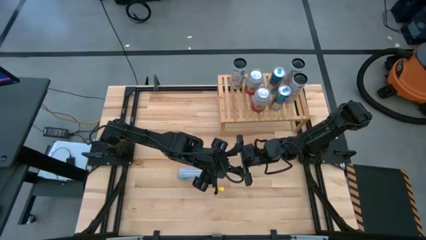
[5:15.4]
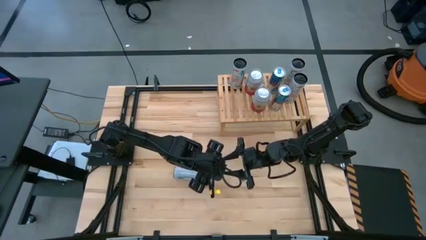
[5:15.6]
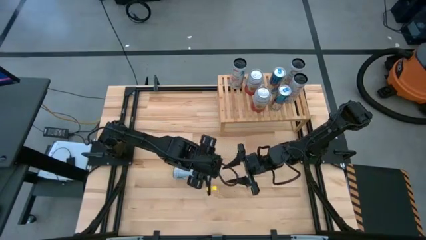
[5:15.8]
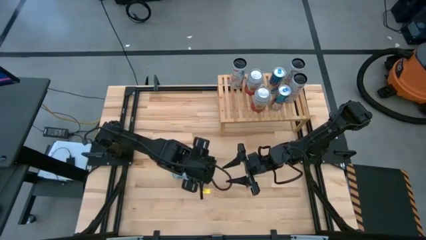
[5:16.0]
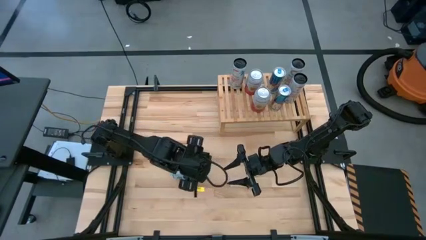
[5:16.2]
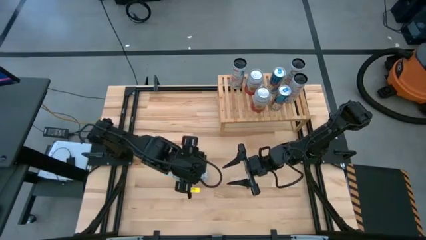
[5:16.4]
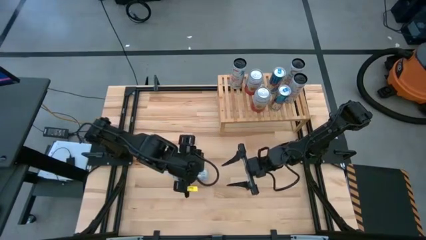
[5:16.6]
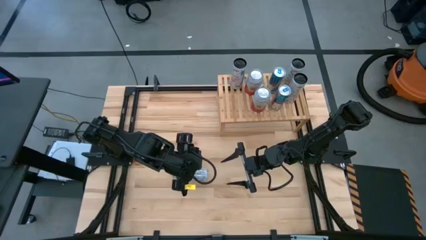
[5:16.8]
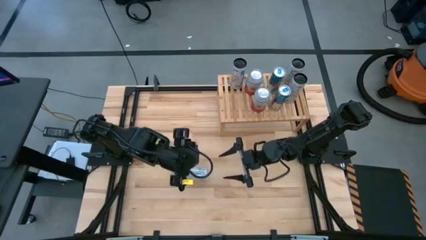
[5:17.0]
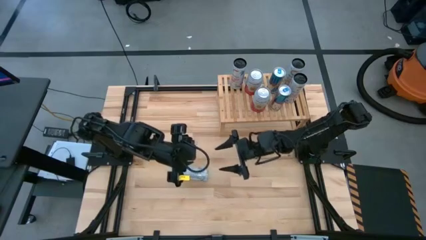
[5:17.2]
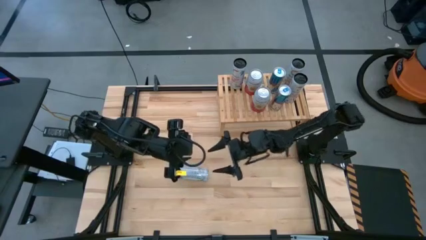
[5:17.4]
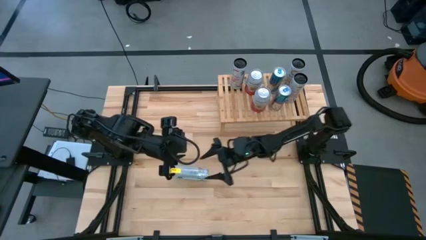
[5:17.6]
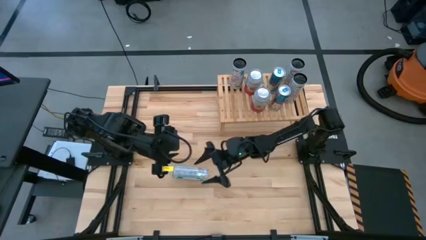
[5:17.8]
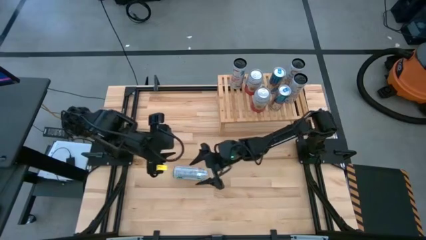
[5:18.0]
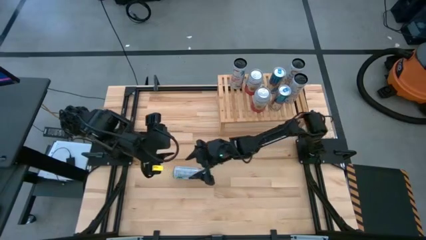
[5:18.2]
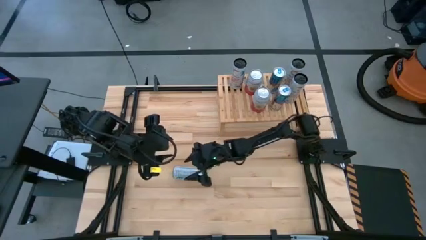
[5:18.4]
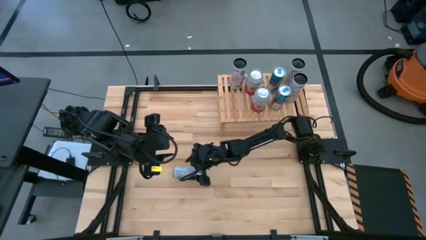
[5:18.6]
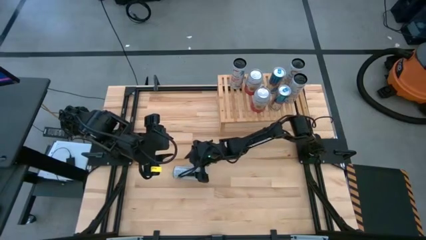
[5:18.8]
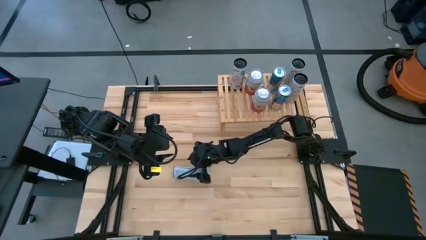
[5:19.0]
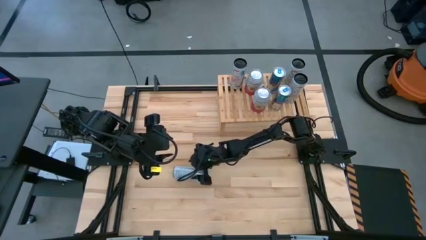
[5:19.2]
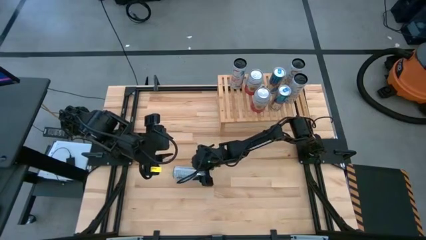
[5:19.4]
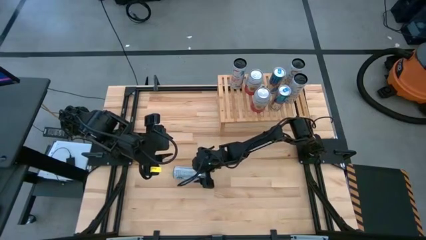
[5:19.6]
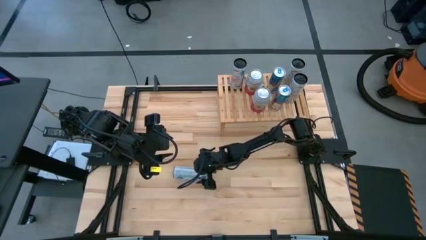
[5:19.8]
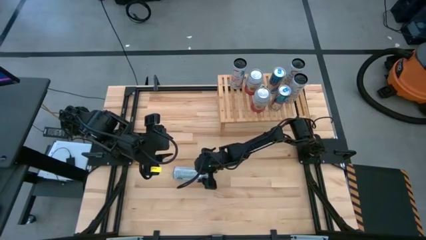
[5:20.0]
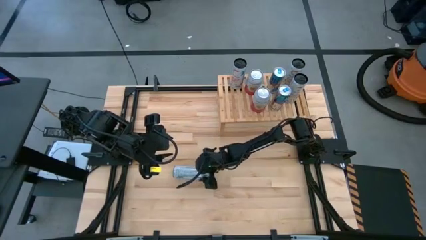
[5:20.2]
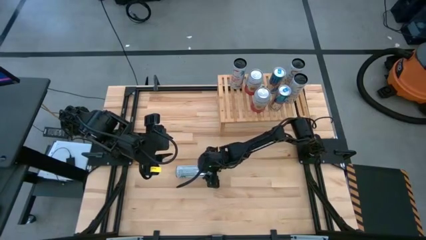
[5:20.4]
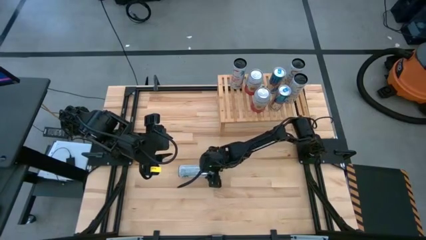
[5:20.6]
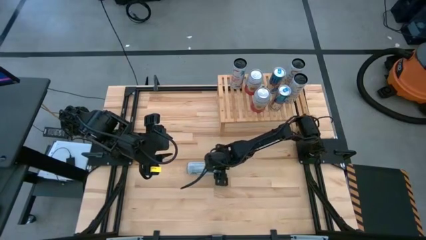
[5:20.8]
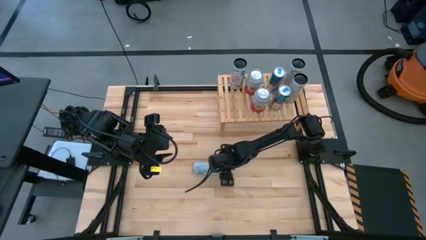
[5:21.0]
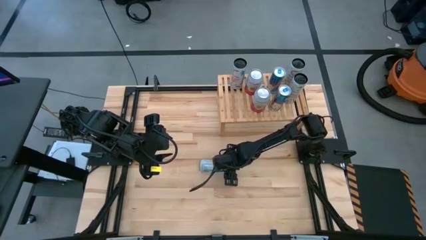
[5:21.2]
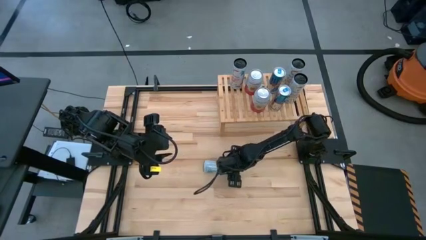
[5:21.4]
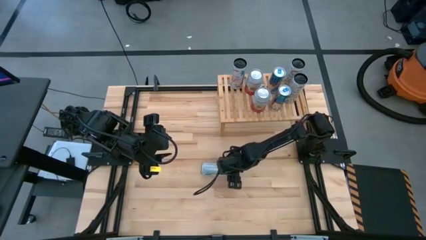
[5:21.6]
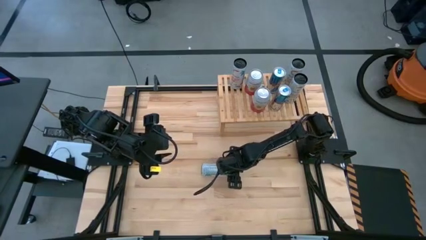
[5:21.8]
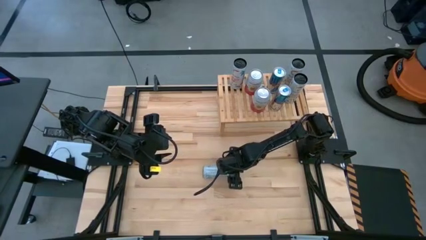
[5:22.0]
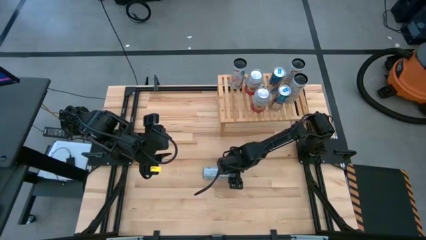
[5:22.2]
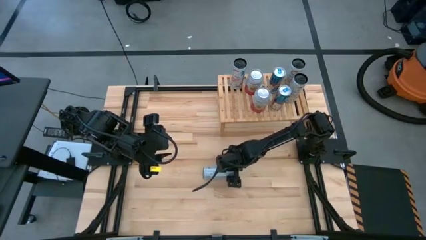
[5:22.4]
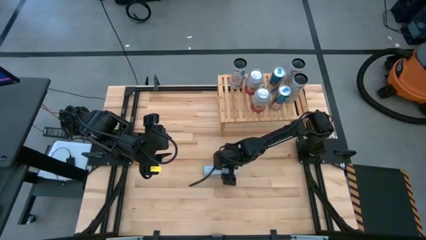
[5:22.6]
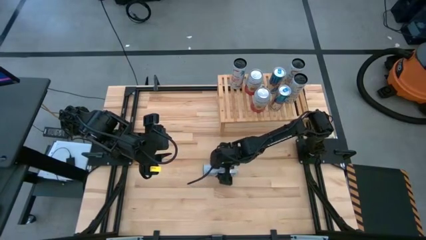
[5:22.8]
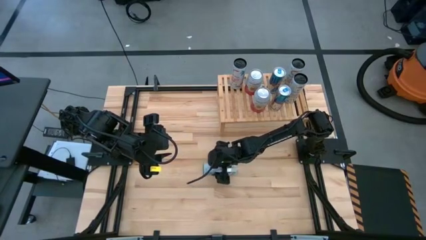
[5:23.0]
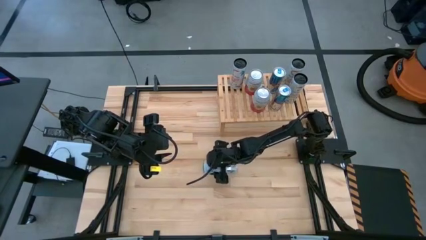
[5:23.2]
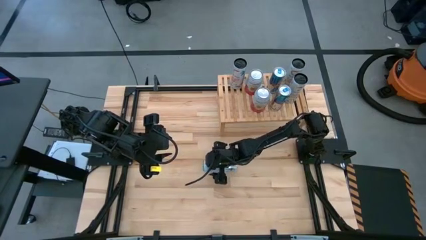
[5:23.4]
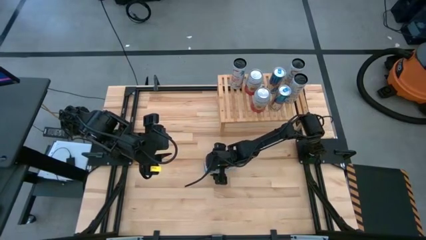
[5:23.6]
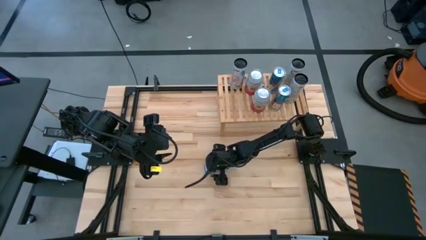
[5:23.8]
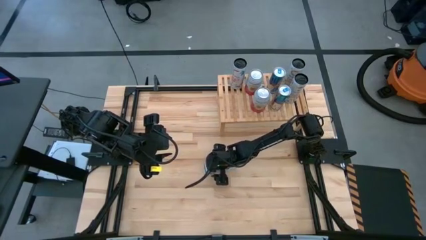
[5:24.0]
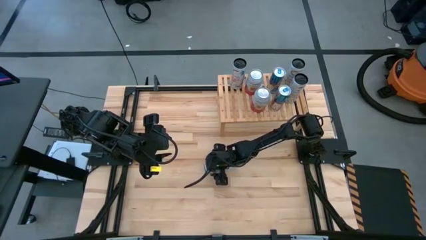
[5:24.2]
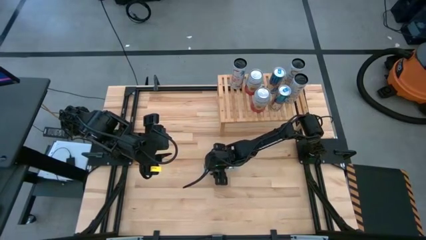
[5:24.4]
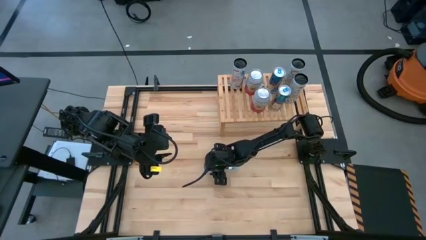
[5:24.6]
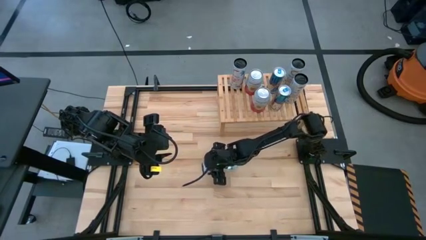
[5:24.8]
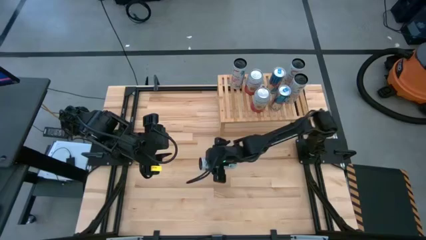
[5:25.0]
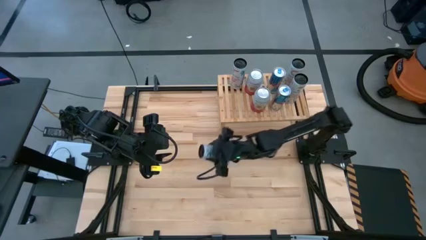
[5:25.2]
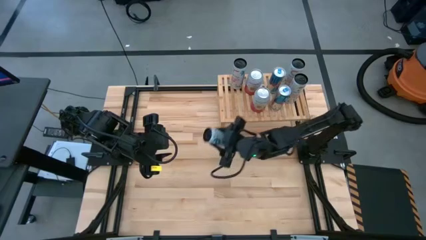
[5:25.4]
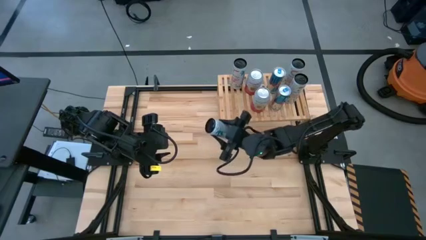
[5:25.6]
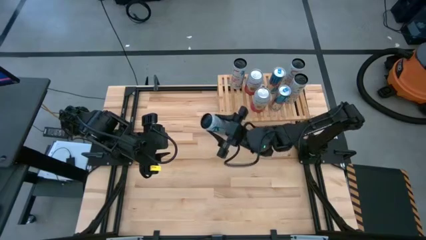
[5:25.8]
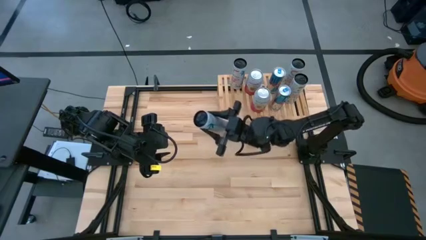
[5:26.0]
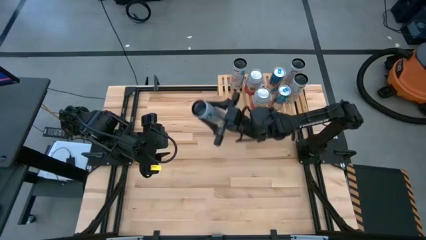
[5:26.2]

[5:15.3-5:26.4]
Task: Place canned beverage on shelf
Put the white-pink soda can on the shelf aligned with the other white-pink soda can
